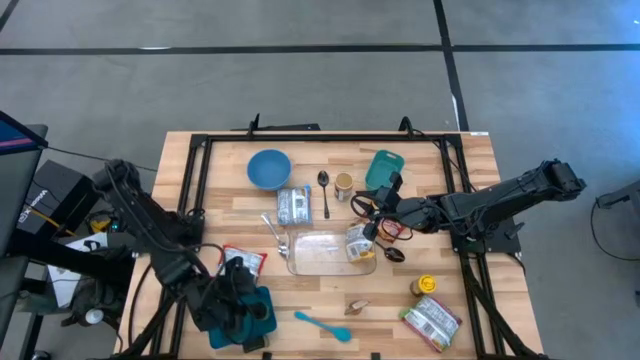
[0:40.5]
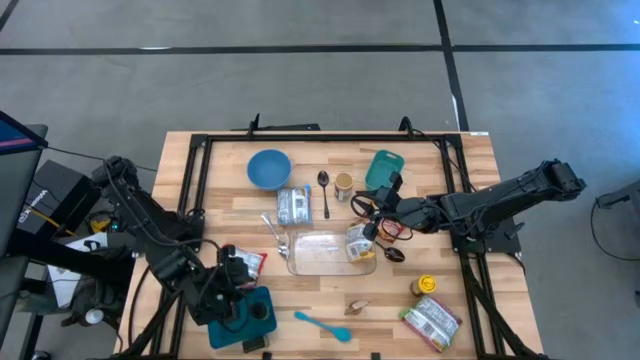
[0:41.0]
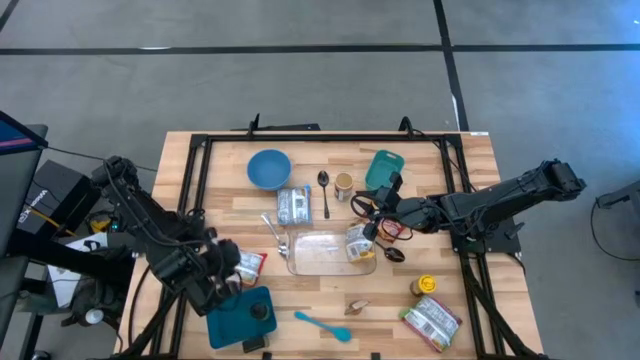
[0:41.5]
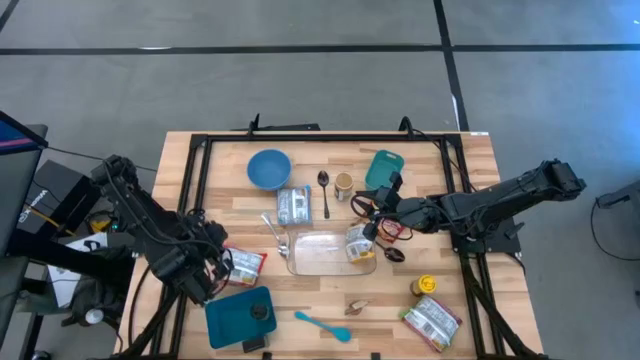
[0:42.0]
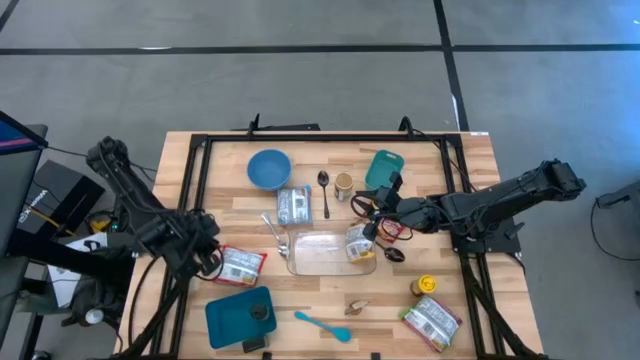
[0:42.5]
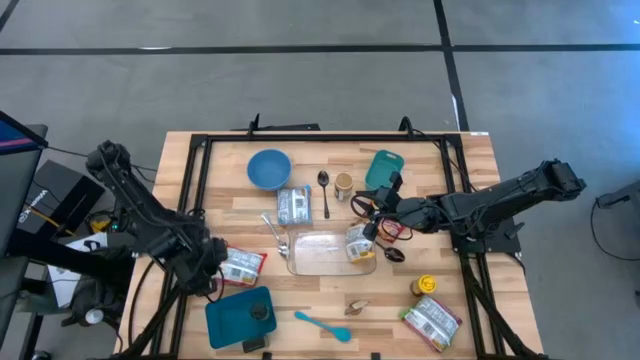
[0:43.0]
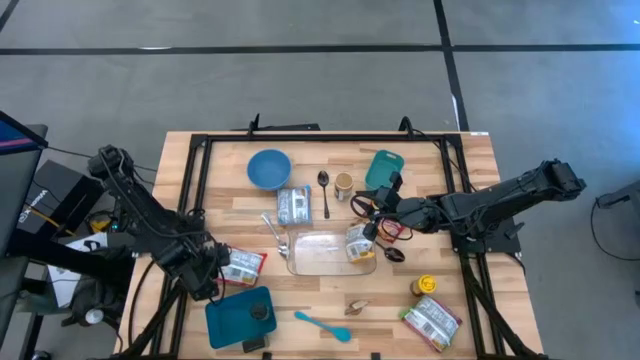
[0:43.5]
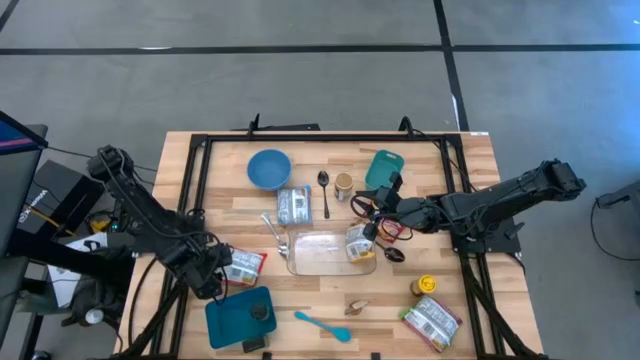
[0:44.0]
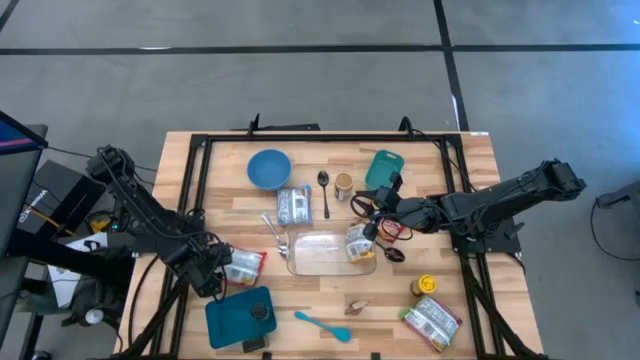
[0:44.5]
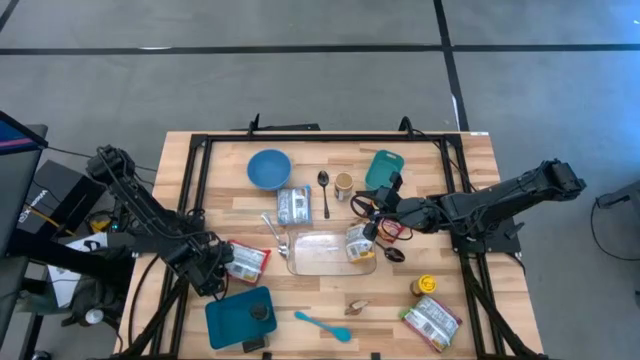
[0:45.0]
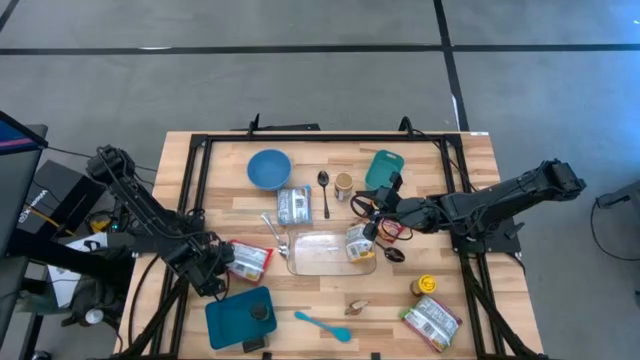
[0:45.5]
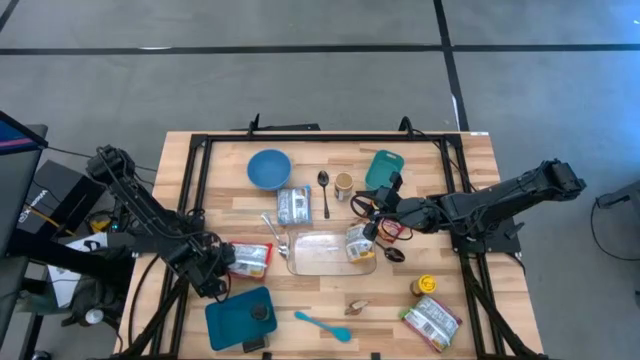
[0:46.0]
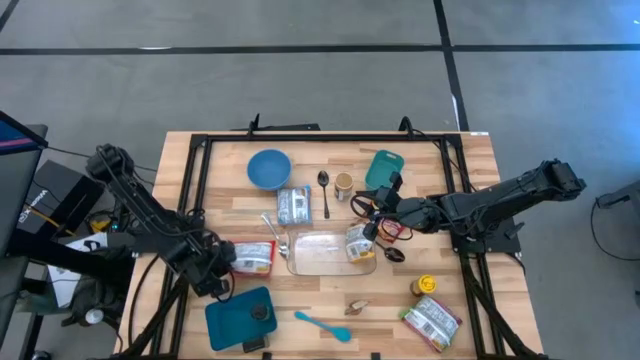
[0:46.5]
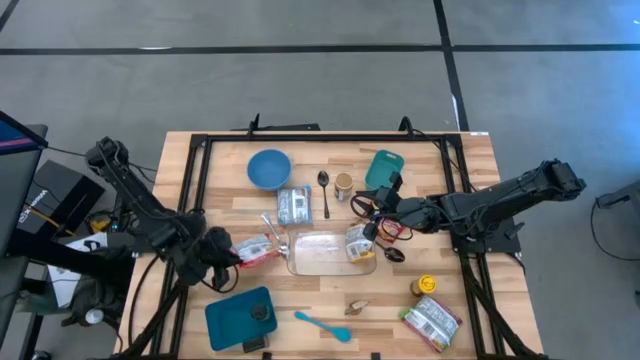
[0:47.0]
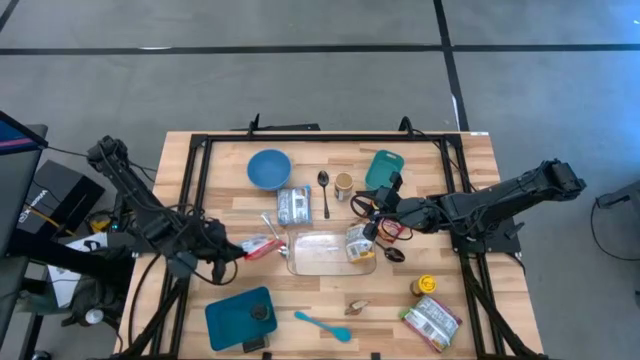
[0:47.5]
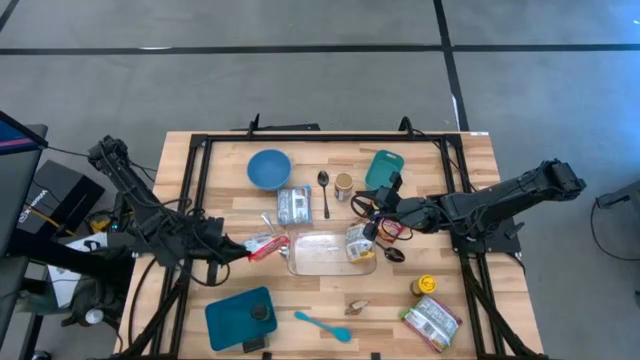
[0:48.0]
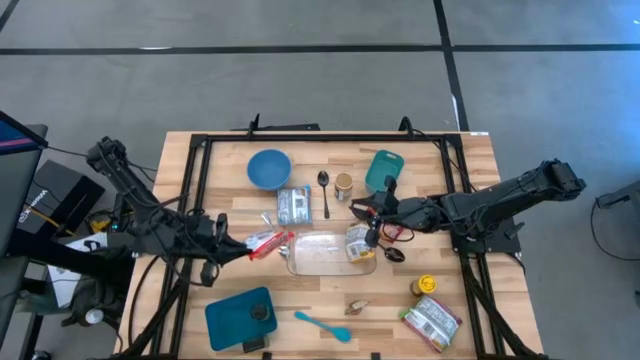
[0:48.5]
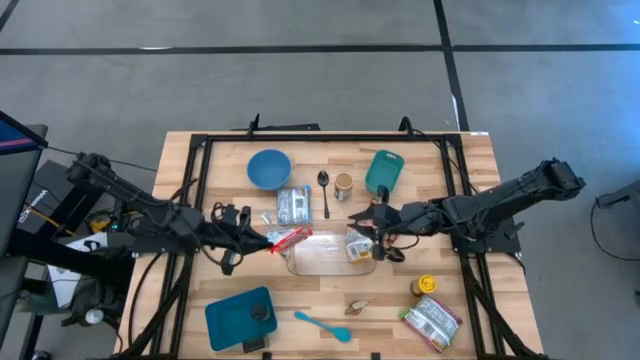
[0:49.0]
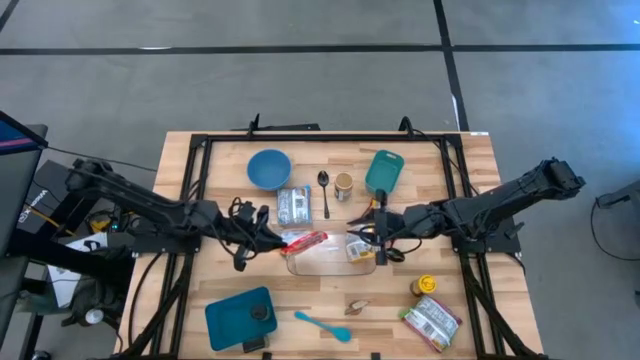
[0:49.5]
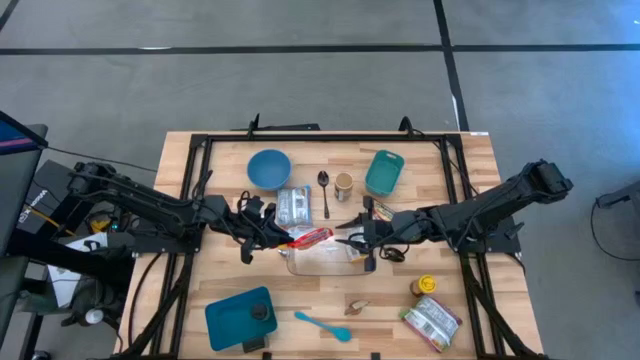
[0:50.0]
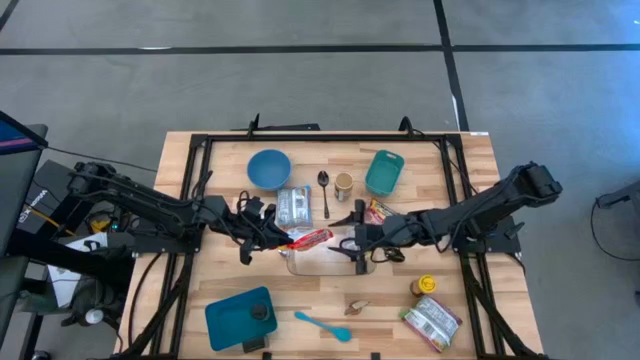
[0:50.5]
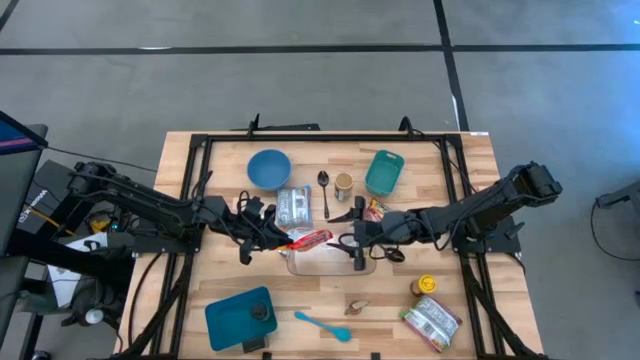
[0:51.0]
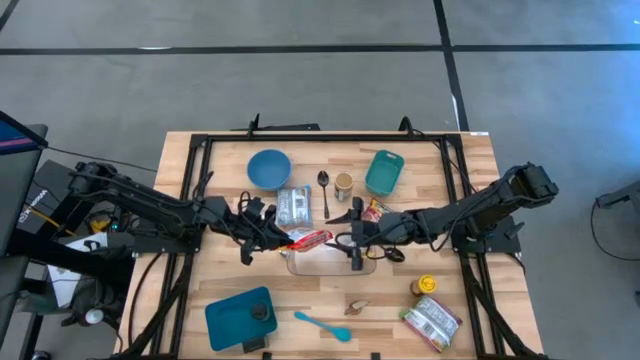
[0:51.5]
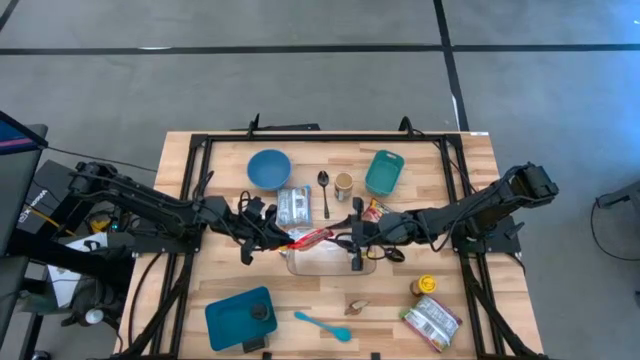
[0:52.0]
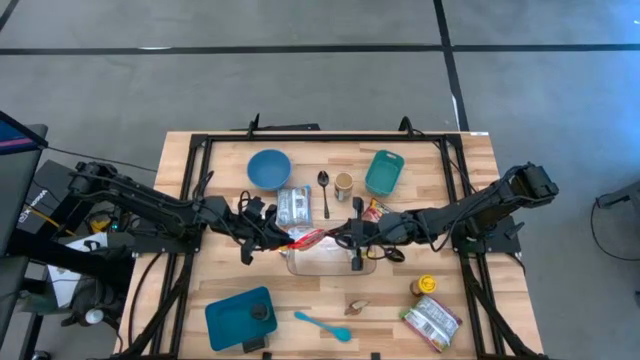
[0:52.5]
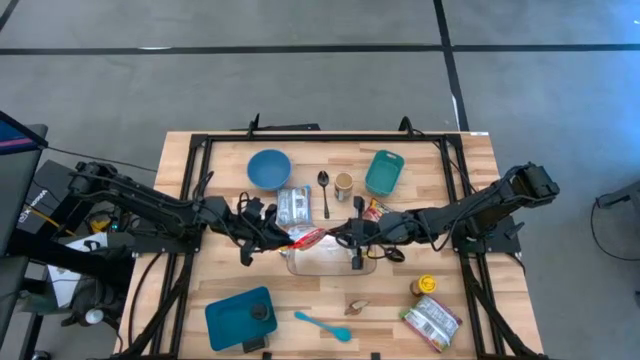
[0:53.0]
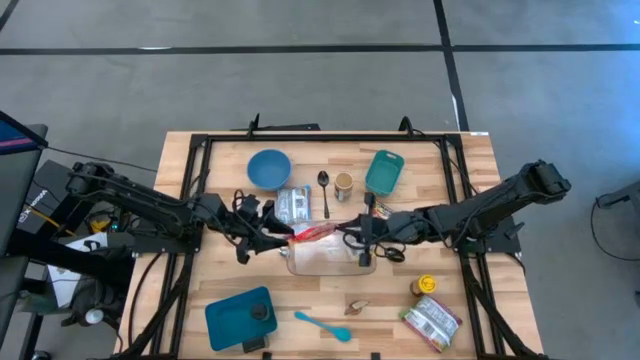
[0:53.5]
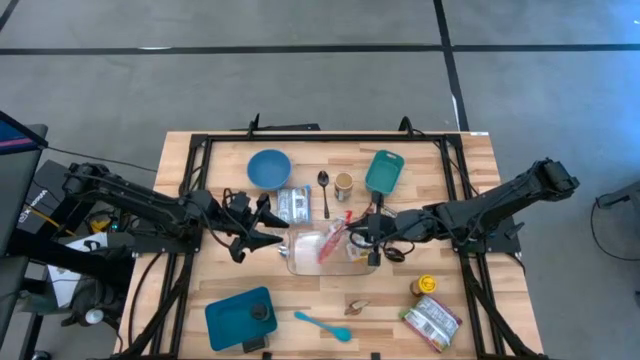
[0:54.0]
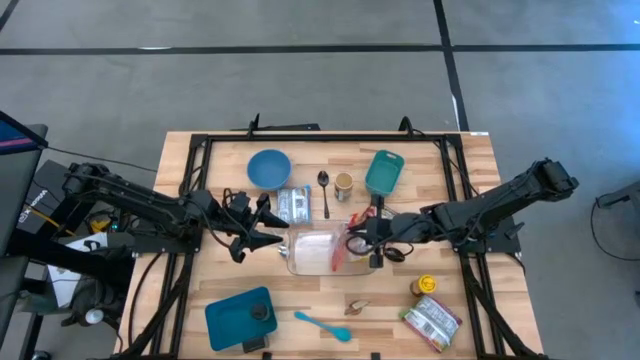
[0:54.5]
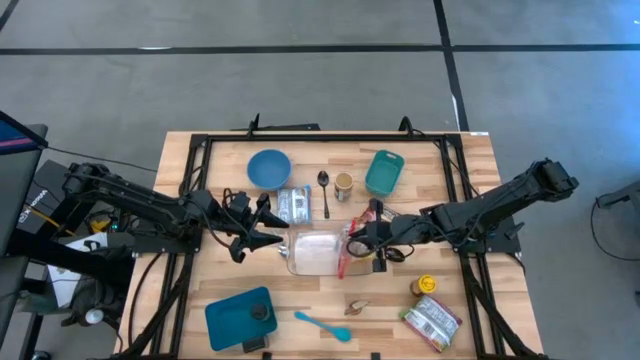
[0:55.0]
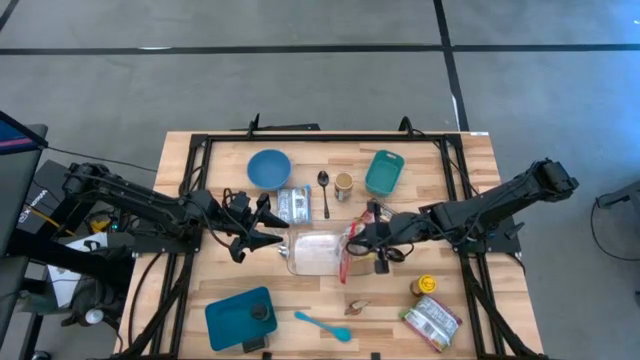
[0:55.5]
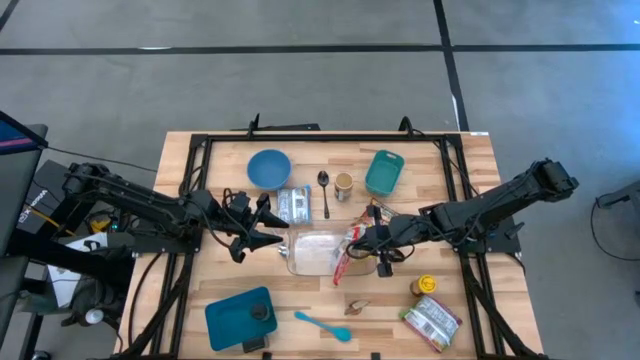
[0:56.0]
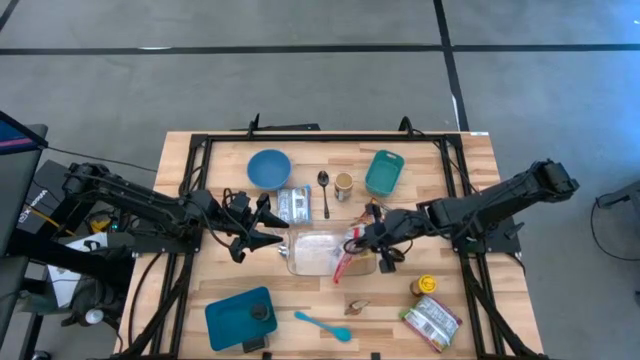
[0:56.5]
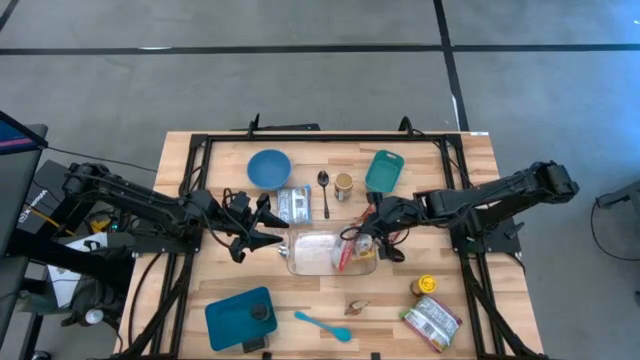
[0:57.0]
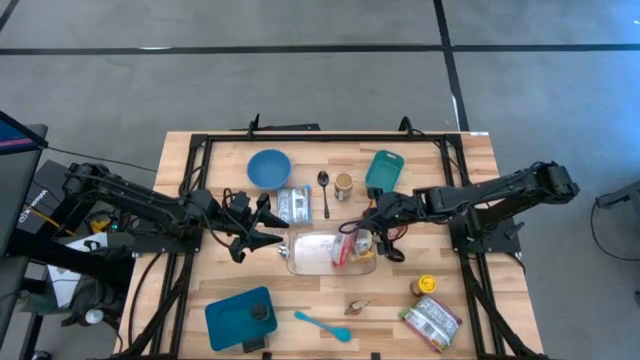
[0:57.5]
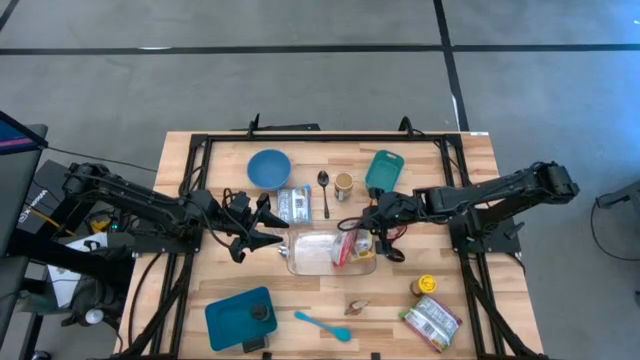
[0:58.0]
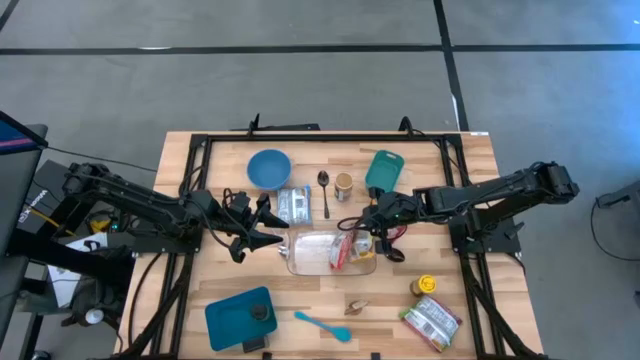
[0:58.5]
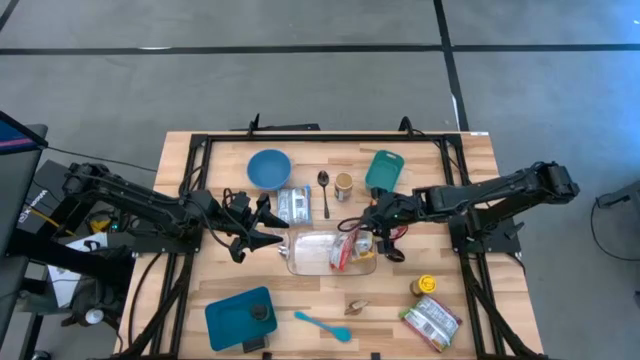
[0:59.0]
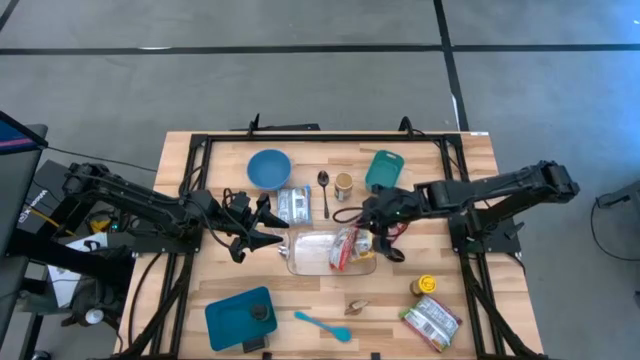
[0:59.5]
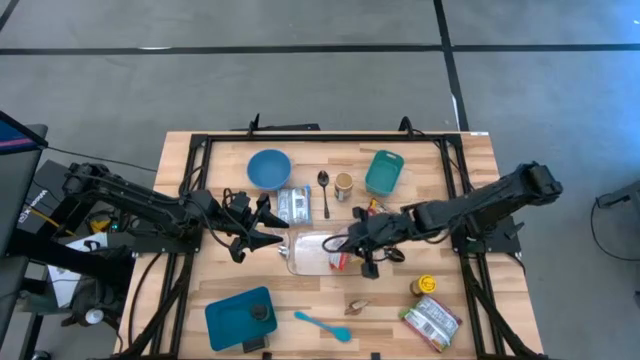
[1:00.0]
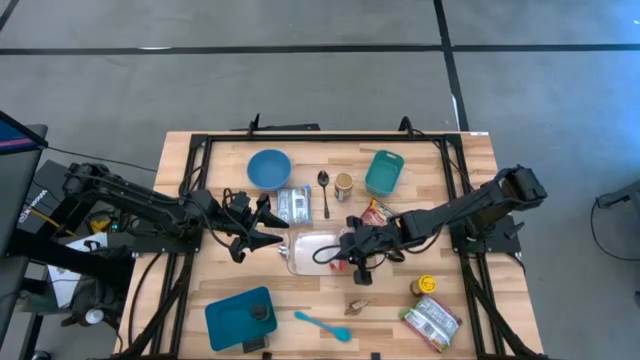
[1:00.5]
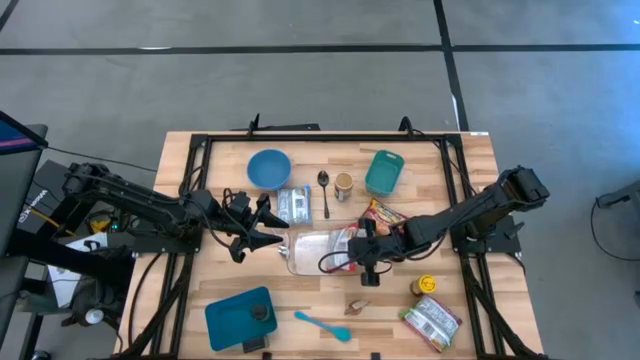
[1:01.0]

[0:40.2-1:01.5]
Task: Pick & Place Food Item
Put the orange noodle pack into the transparent bin

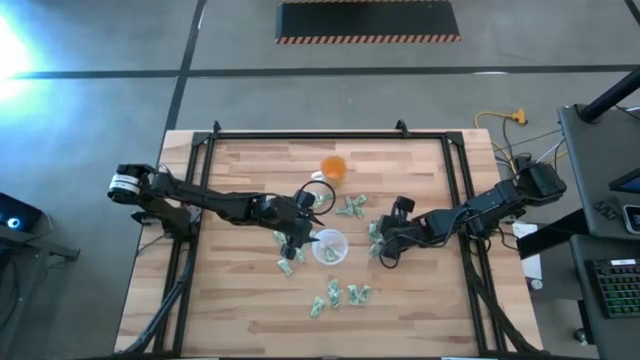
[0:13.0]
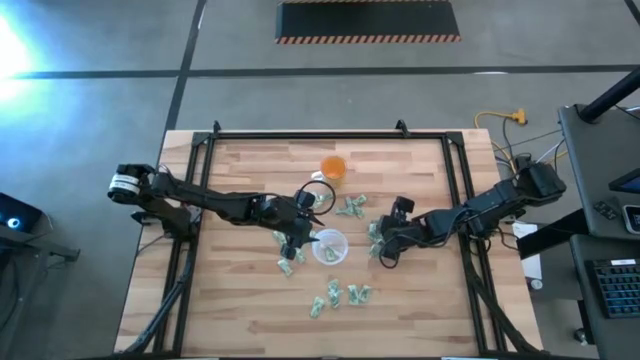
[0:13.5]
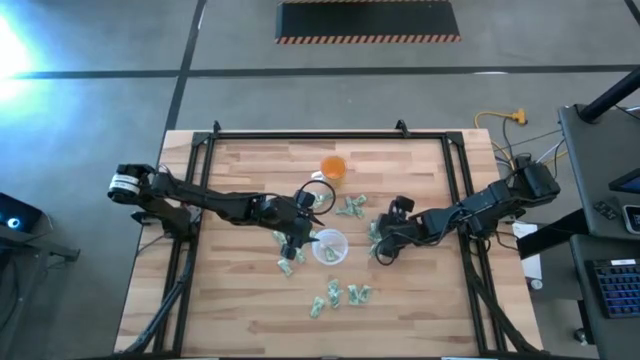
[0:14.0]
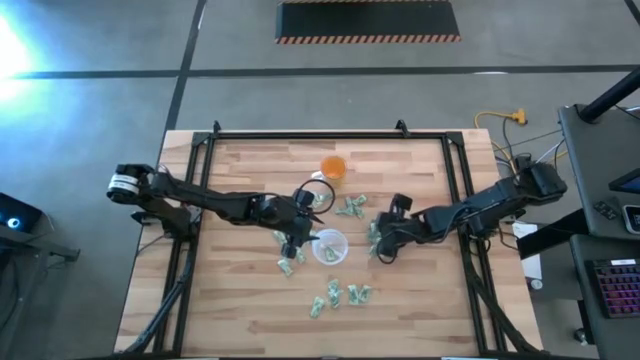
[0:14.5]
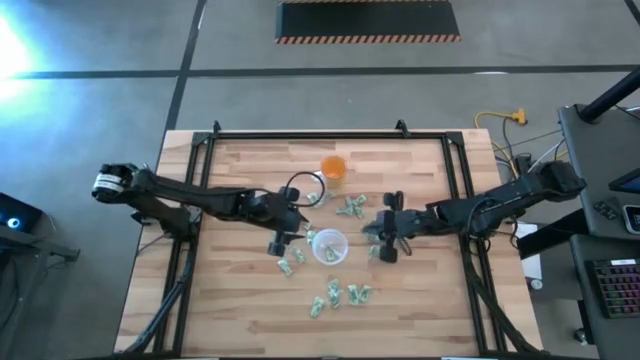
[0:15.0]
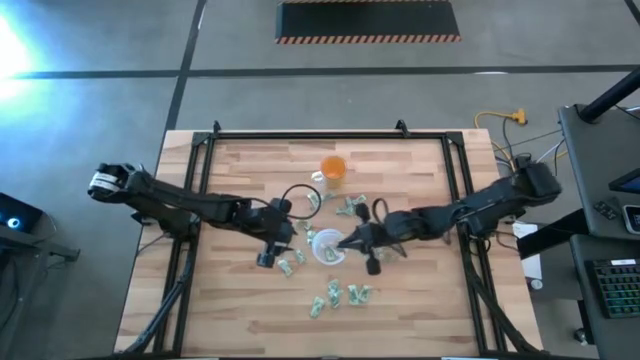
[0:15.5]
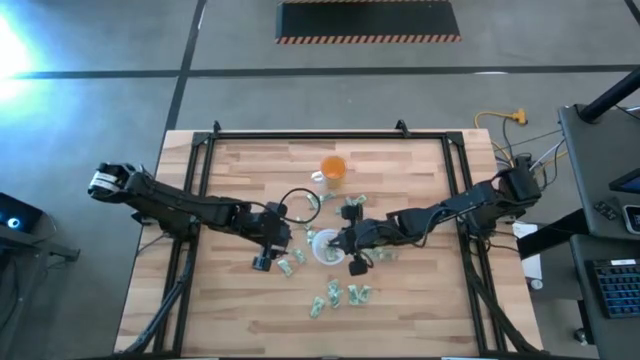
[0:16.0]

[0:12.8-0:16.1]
Task: Pick and place Stevia / Truvia into bins
Put the green stevia packet into the transparent container
